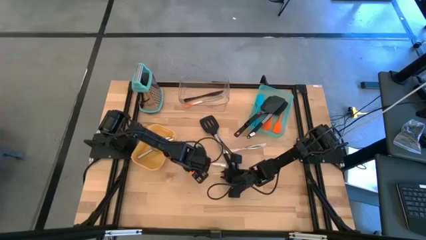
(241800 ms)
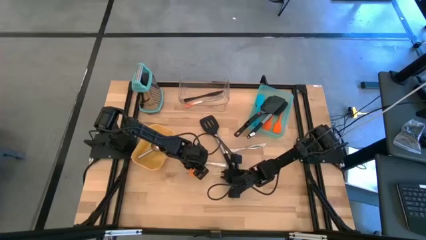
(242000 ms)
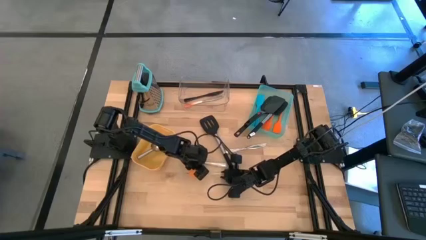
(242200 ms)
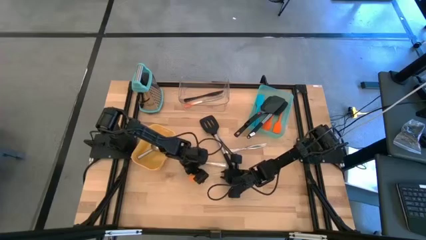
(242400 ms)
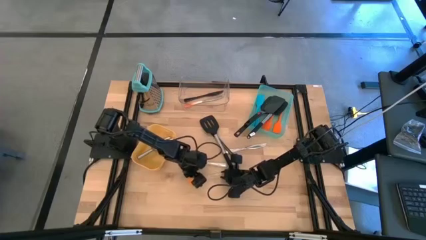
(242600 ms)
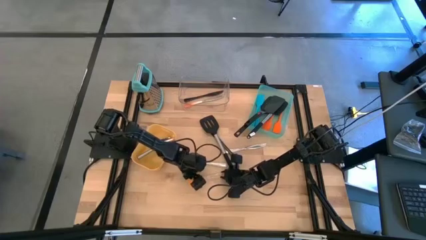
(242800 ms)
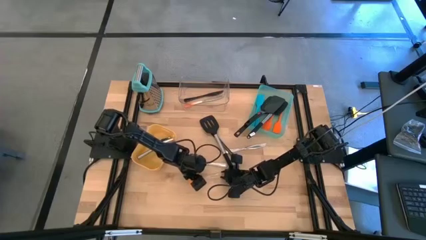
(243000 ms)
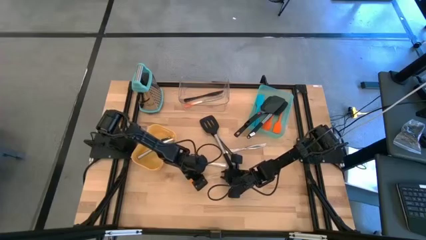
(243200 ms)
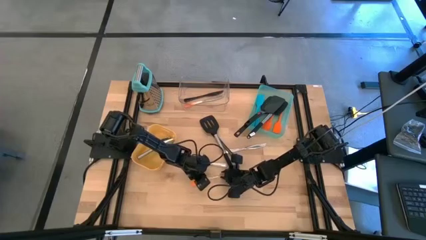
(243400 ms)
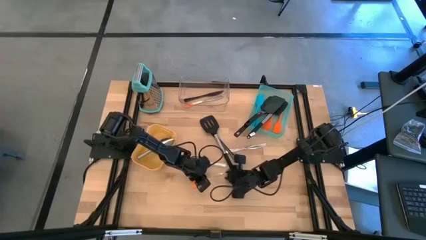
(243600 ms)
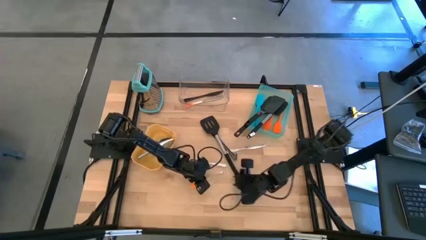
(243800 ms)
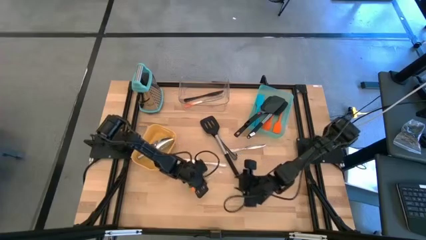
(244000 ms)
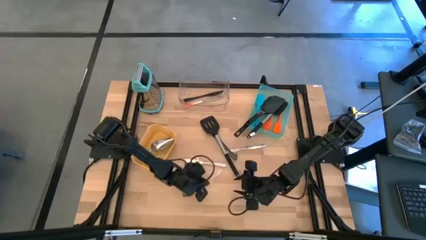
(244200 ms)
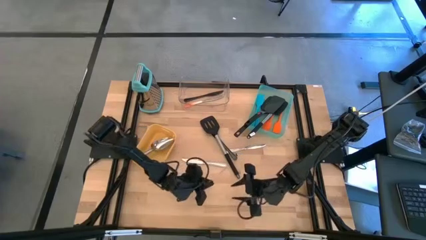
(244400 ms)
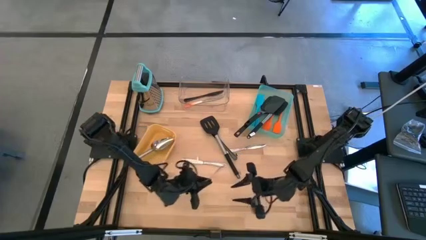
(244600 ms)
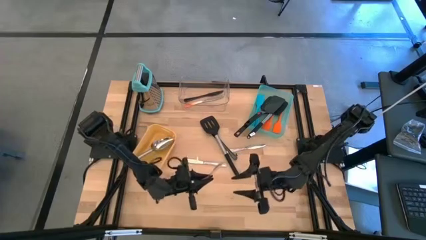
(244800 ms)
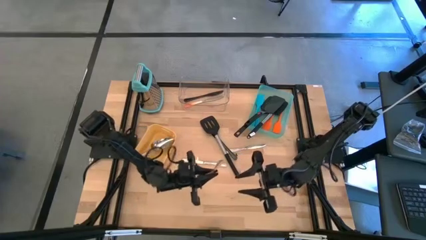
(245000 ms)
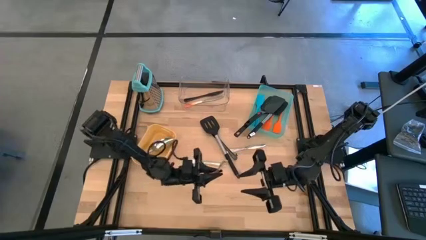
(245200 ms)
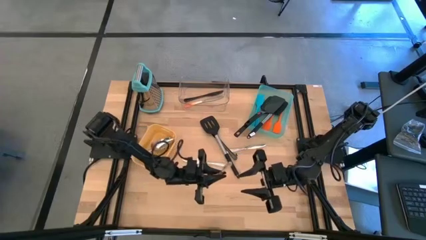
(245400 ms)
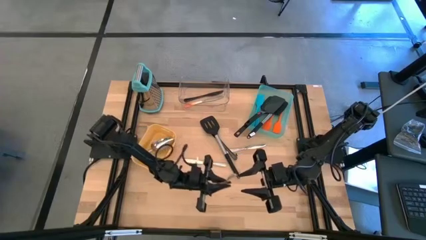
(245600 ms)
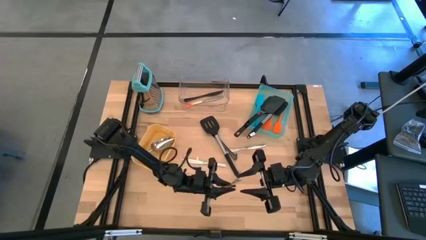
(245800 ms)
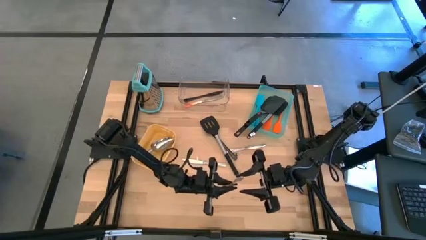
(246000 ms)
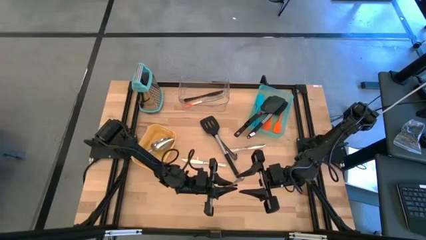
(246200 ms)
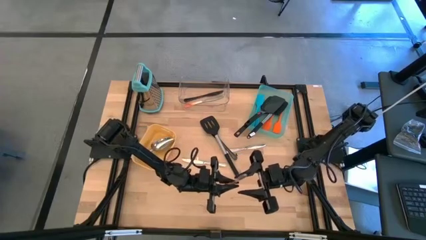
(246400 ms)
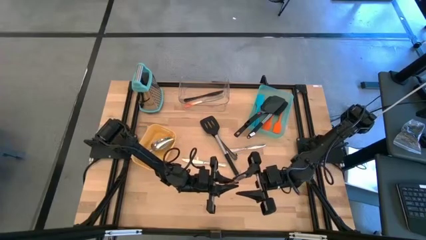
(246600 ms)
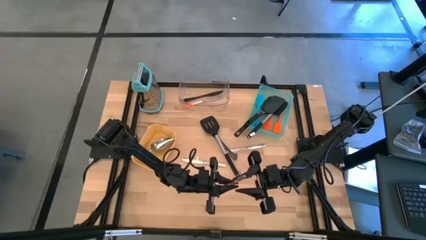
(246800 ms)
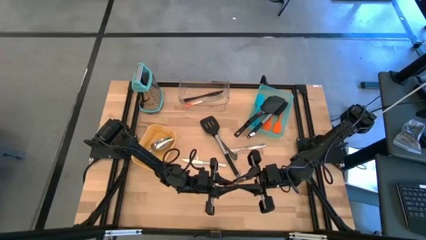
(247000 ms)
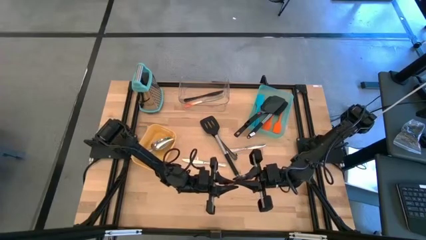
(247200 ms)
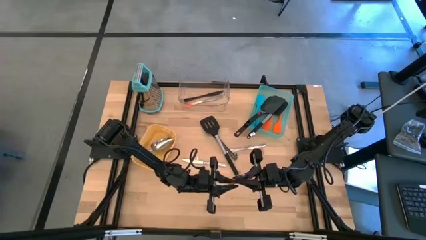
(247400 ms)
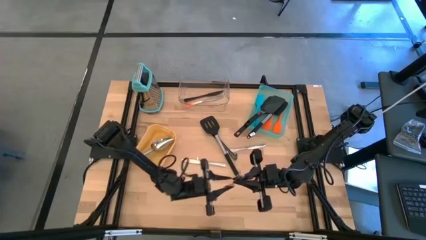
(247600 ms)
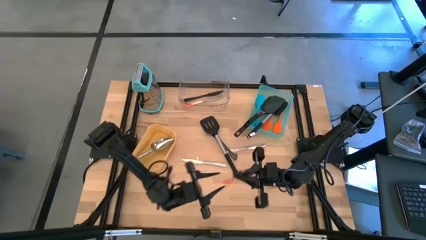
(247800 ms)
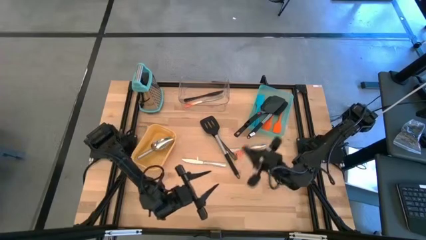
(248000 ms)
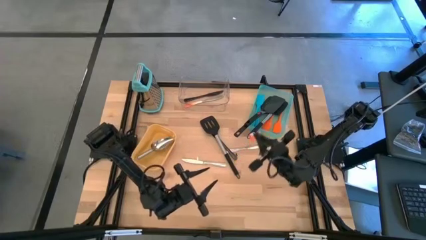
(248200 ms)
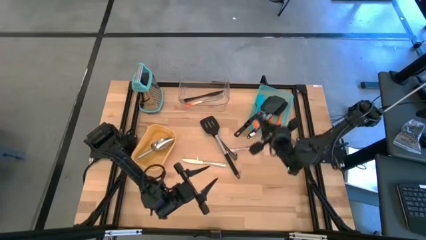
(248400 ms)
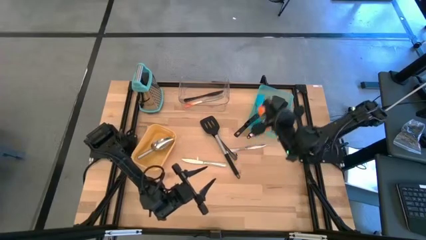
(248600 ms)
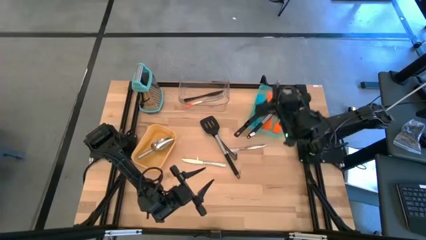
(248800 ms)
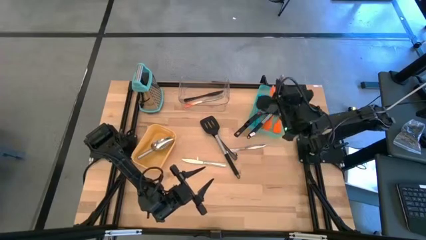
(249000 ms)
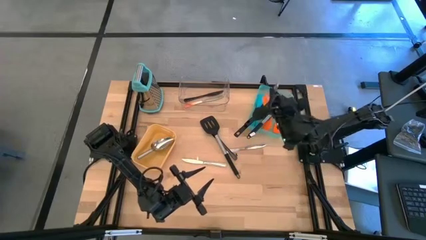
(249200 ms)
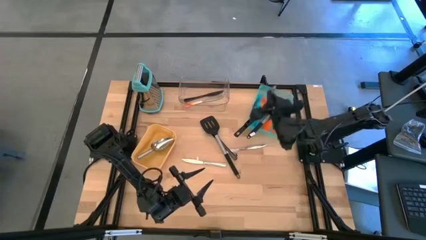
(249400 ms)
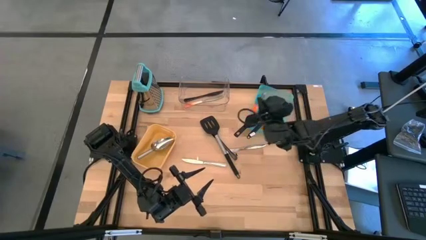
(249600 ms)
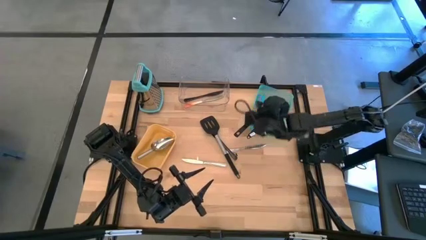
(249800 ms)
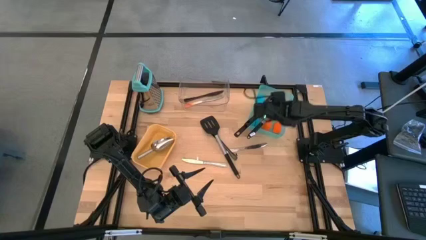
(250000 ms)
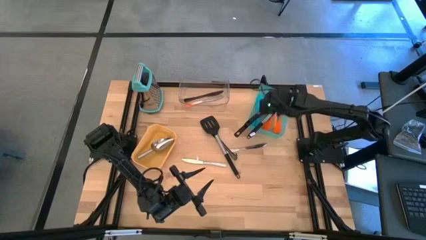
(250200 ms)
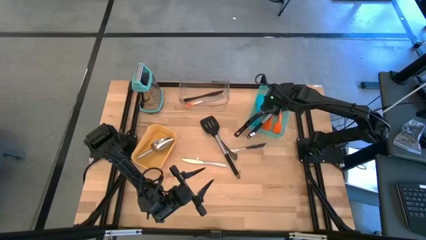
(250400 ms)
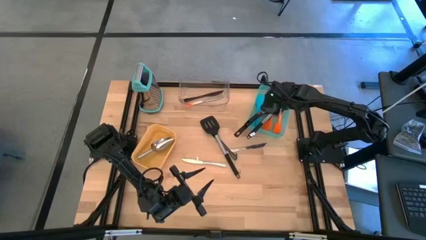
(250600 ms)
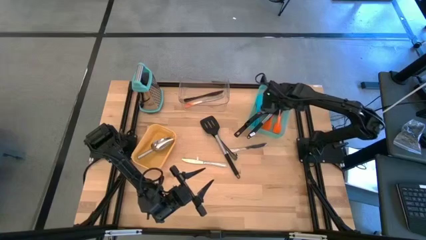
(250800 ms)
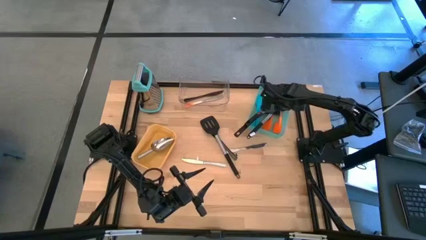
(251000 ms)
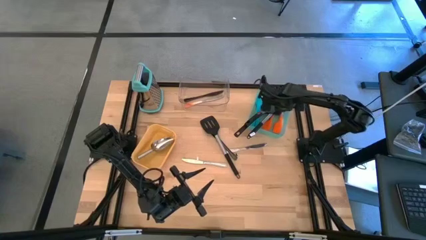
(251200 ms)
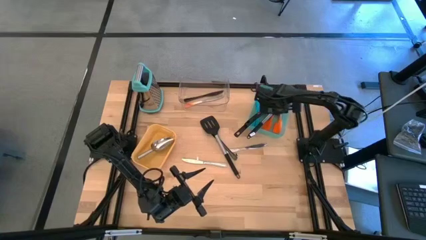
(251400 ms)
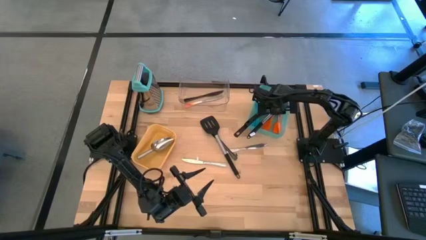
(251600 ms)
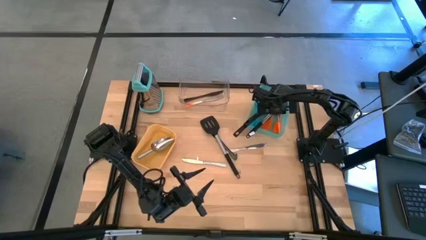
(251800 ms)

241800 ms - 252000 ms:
Task: Pick & Place Kitchen Items
Put the orange spatula into the green bin

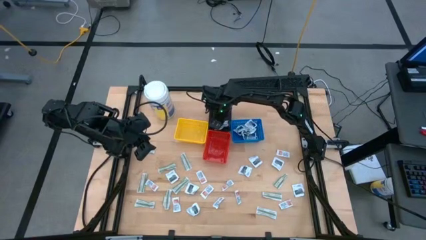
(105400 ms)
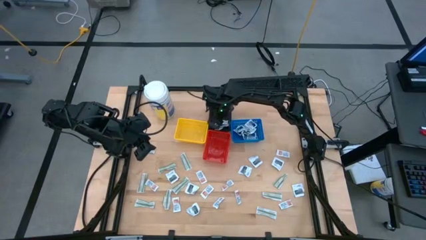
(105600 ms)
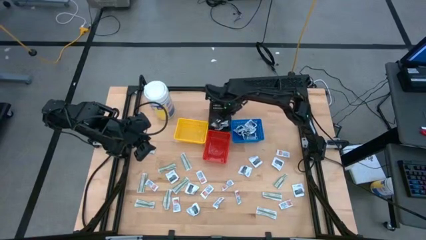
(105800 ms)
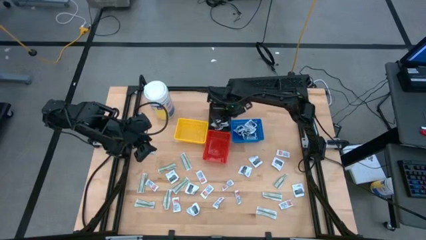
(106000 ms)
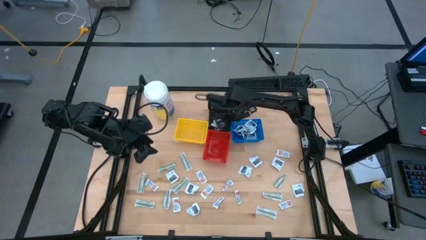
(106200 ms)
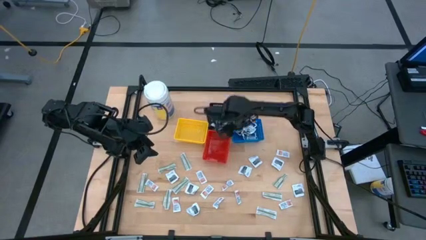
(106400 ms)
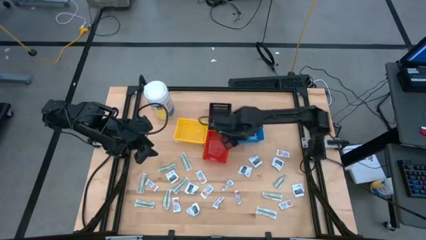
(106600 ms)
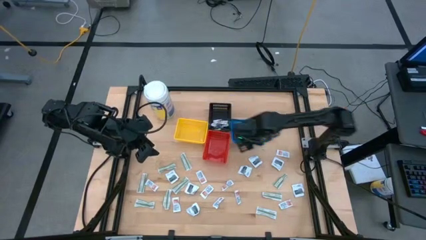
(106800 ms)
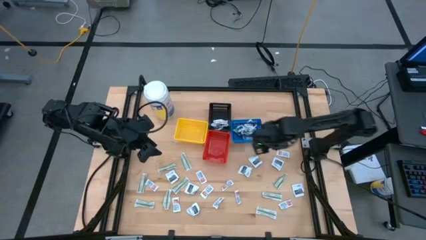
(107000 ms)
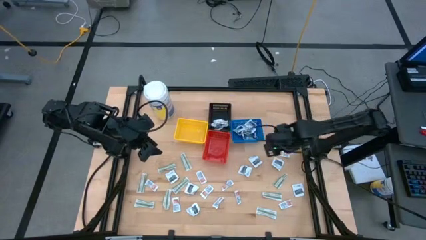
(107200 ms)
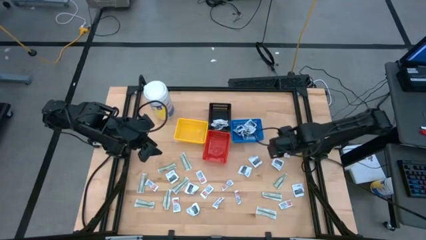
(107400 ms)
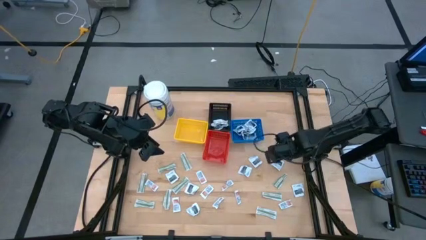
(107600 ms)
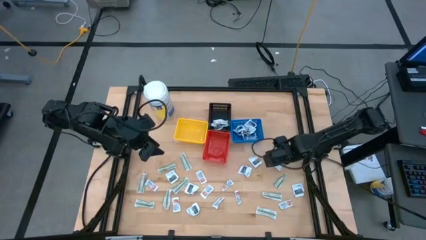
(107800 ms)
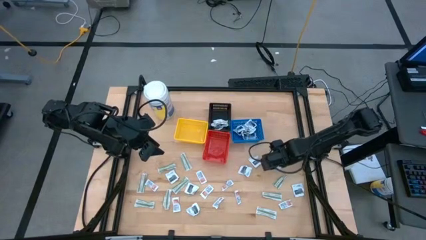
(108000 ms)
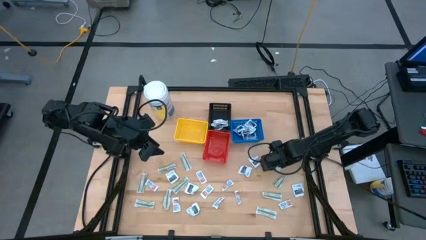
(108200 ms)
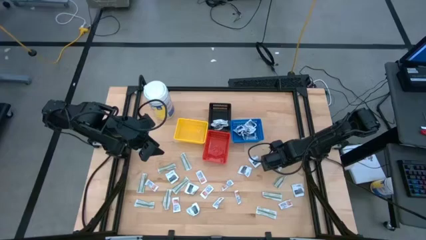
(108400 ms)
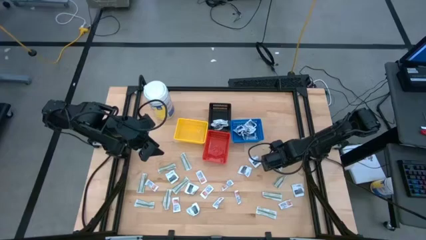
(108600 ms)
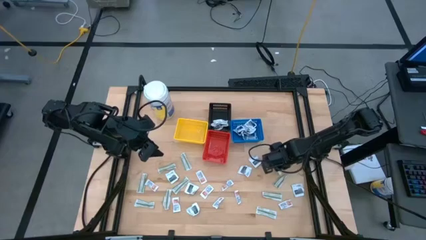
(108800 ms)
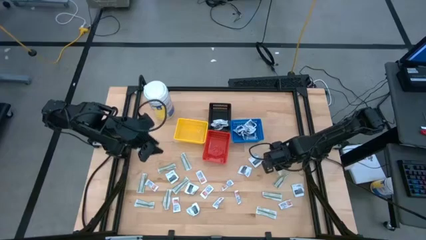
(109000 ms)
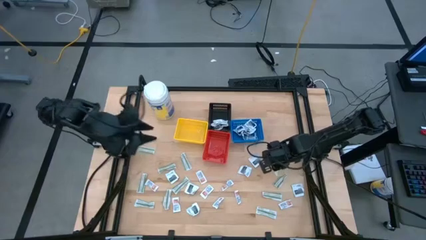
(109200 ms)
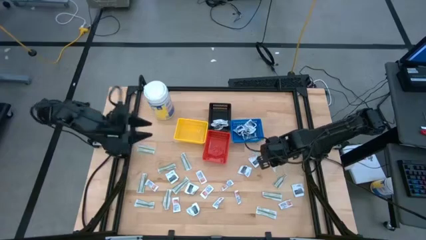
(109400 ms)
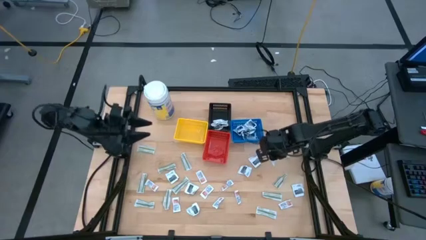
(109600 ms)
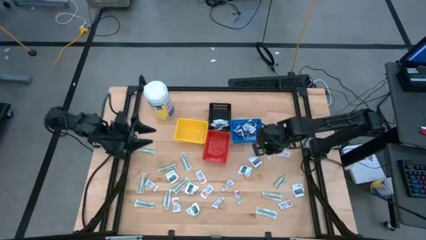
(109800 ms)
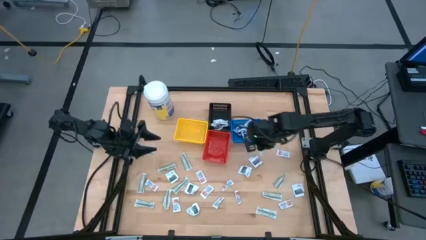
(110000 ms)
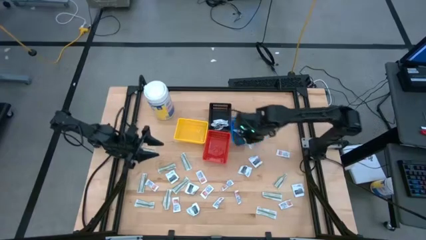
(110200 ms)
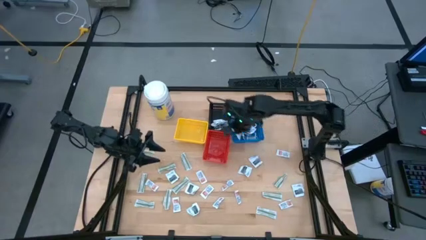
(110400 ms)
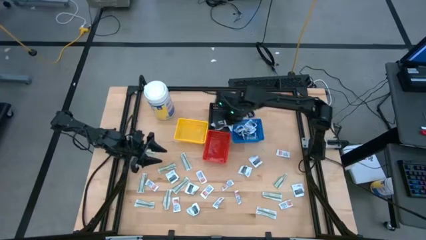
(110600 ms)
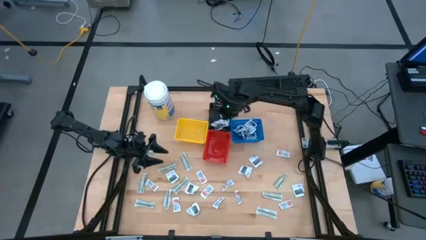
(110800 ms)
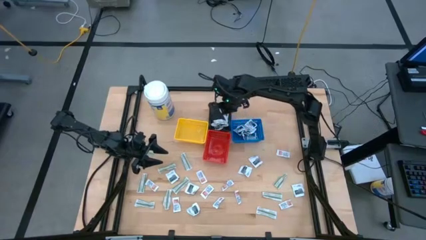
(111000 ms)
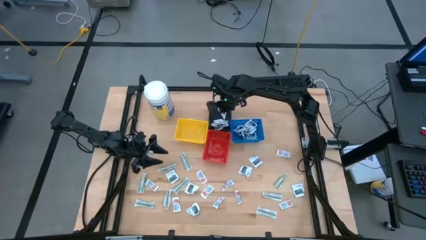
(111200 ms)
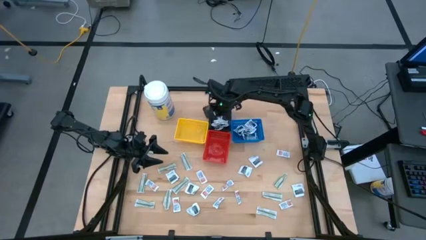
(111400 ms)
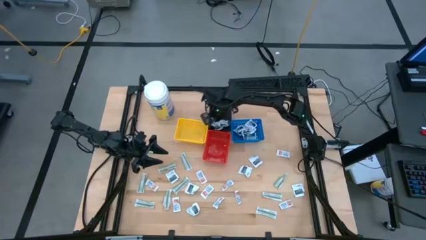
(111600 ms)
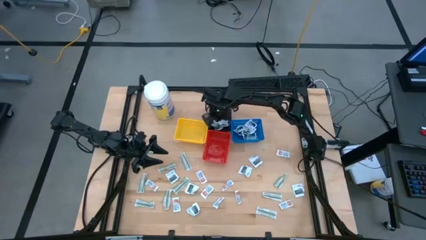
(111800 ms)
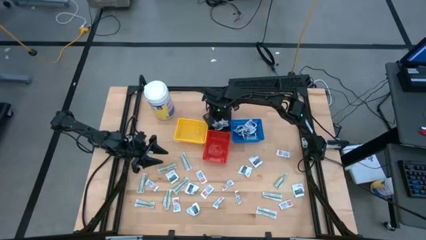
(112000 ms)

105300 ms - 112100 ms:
Task: Pick & Place First Aid Supplies
Put the towelette pack into the black bin
